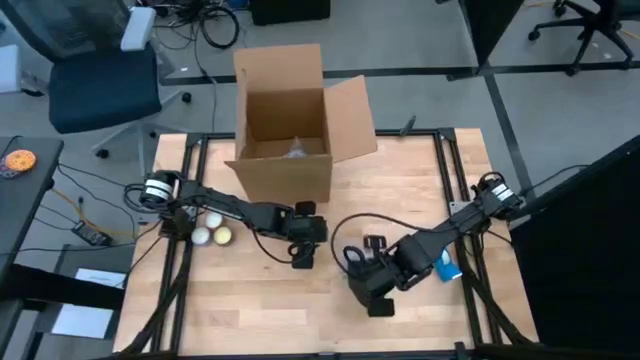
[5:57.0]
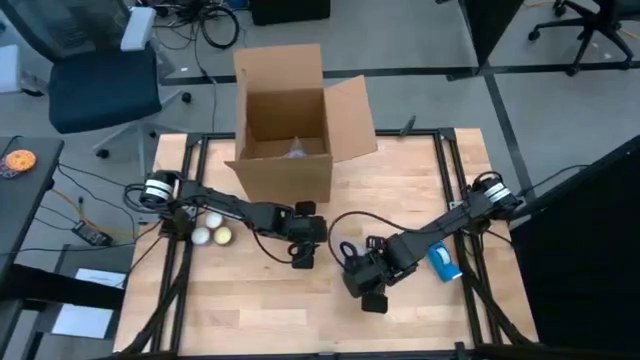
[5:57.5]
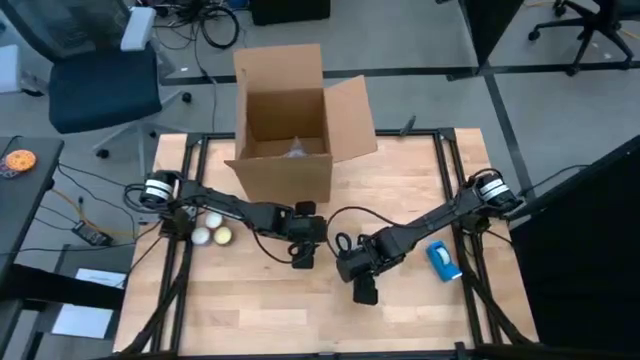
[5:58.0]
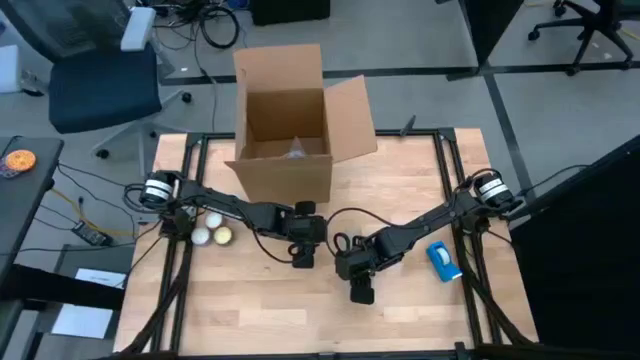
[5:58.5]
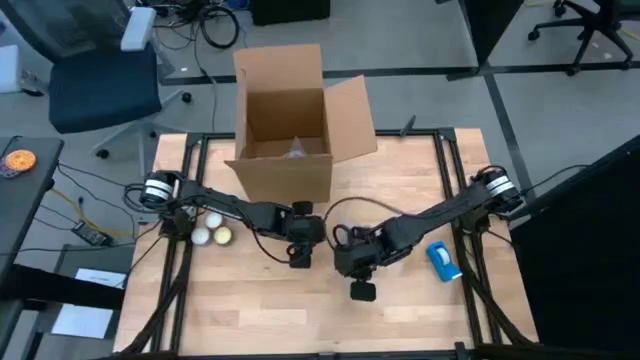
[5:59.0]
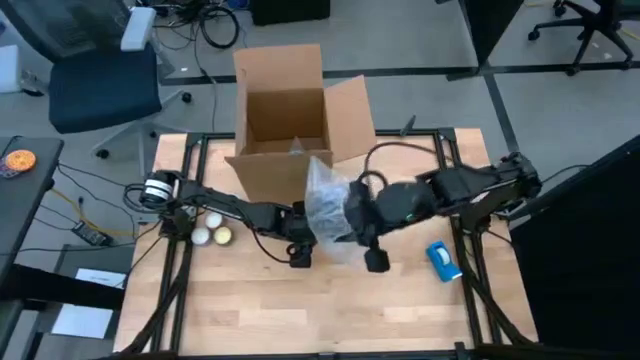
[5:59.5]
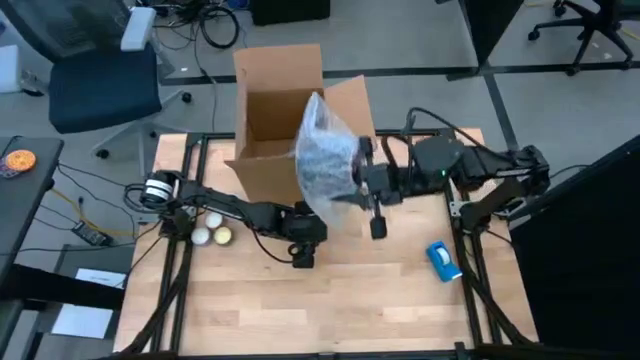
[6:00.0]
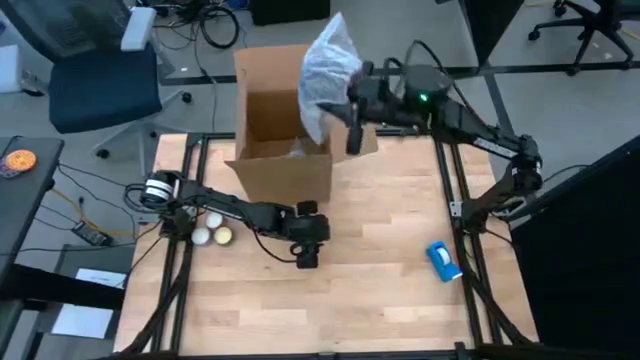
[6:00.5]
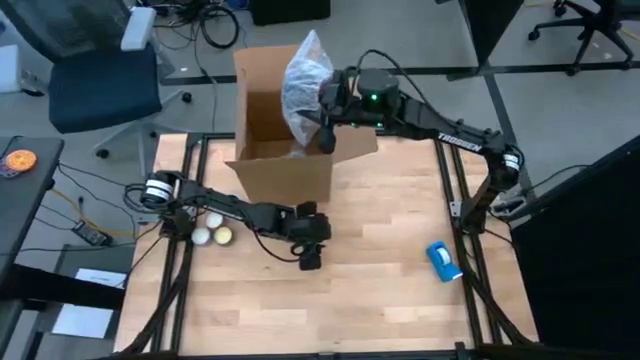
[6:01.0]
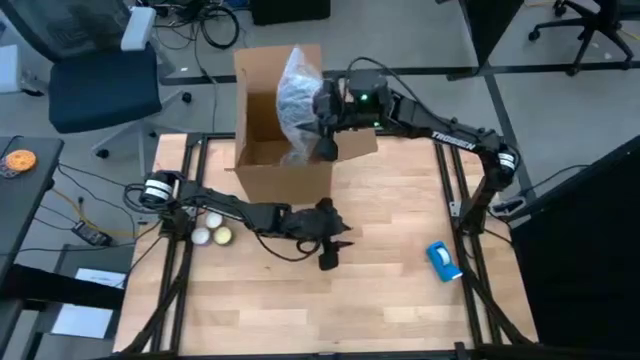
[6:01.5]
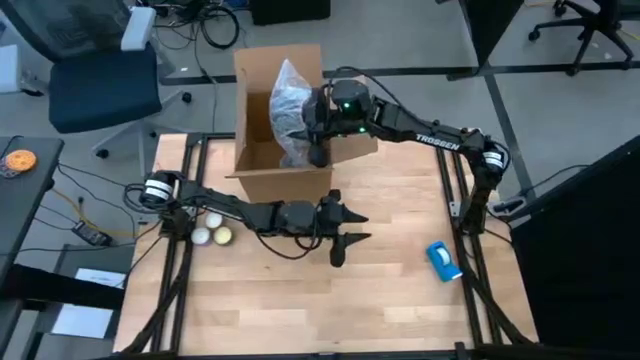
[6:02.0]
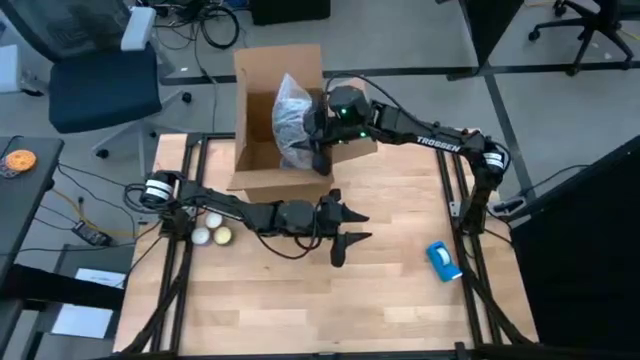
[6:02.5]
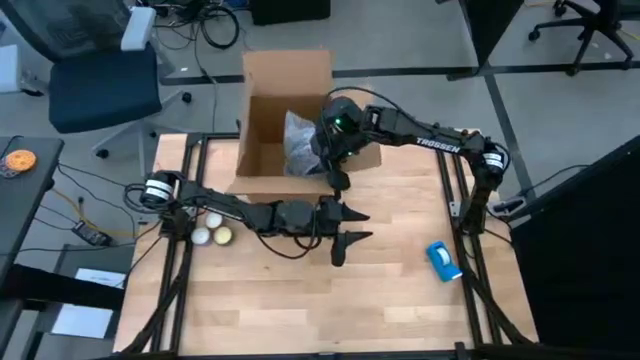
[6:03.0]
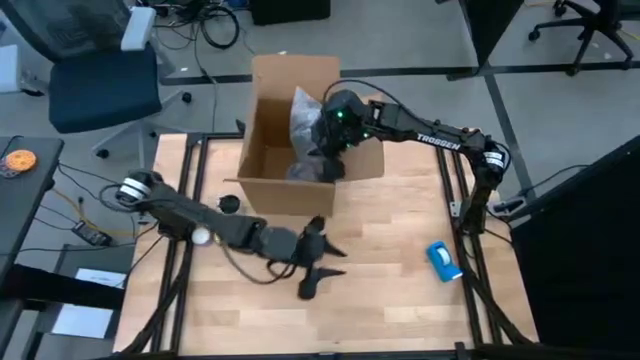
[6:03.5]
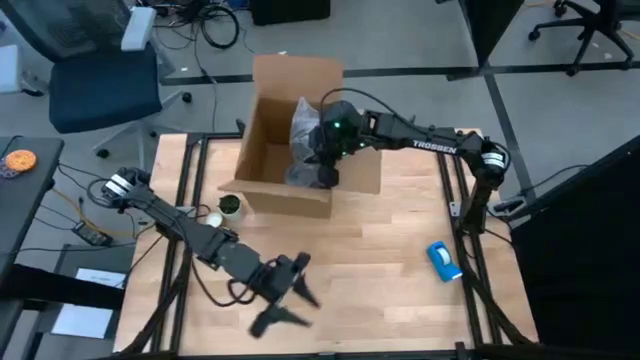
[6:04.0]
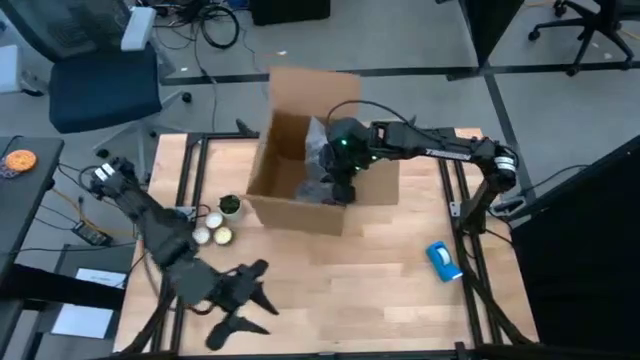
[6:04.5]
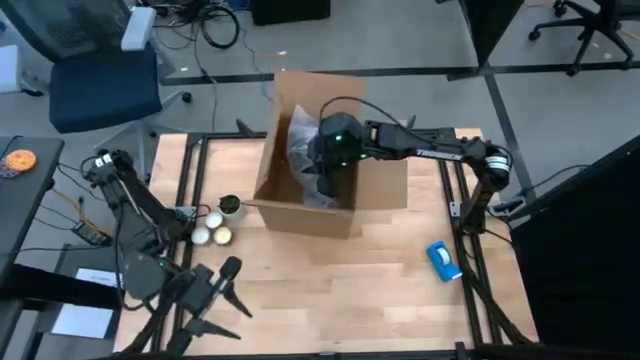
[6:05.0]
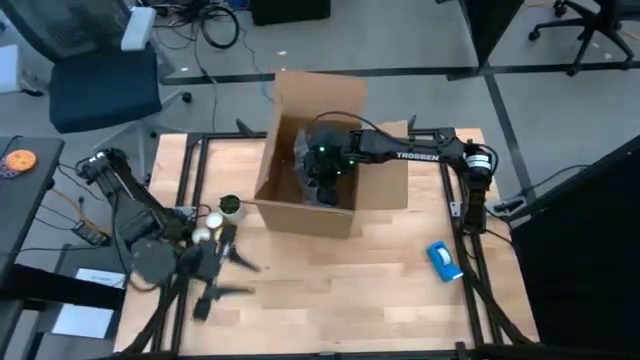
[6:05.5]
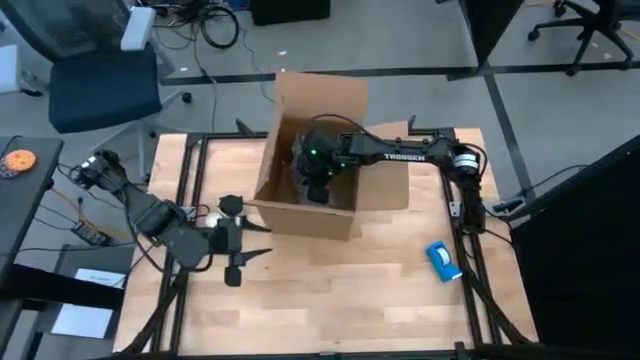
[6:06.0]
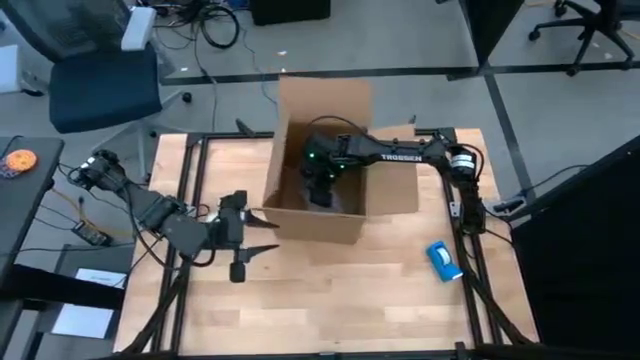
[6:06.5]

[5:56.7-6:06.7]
Task: wrap mug
Put the wrapped black mug into the box

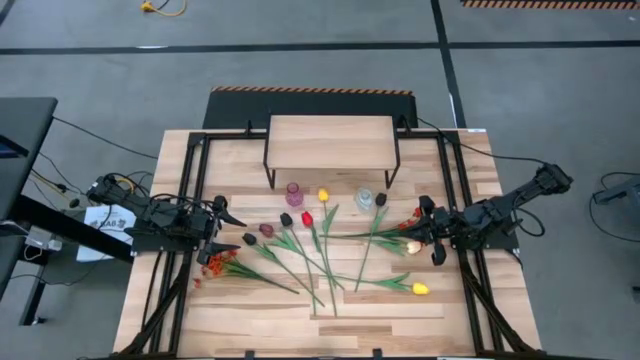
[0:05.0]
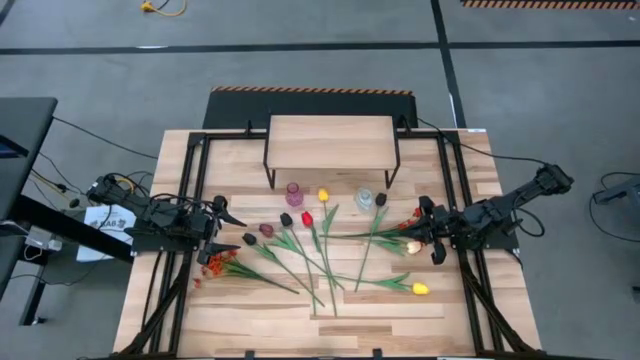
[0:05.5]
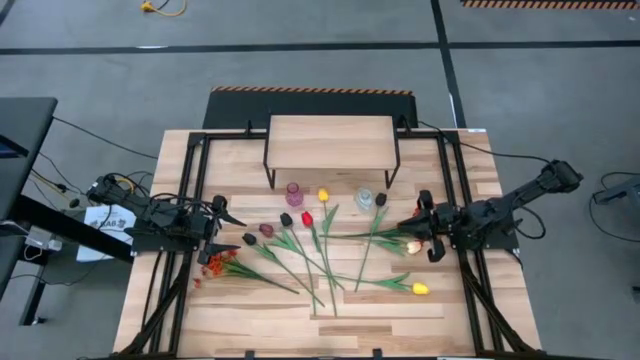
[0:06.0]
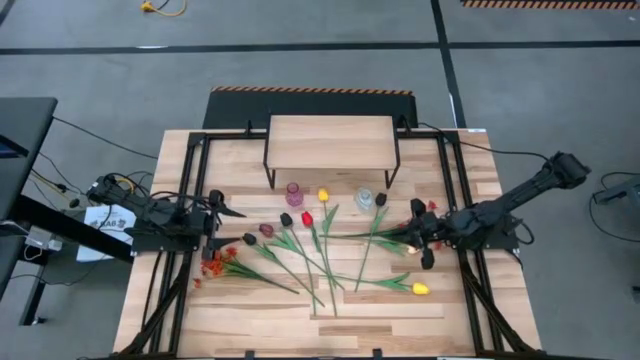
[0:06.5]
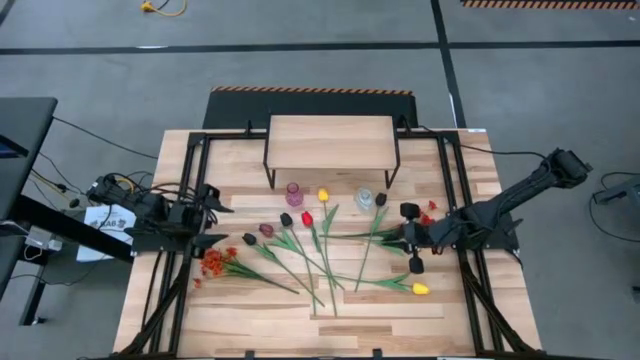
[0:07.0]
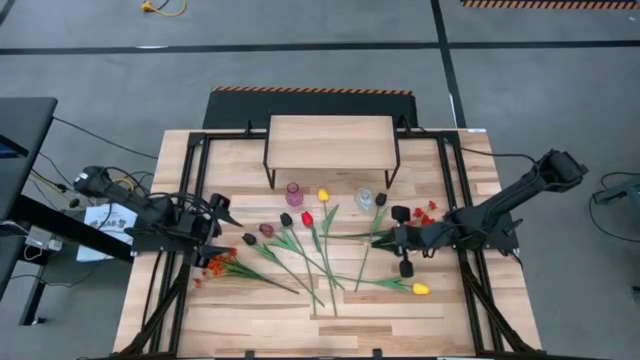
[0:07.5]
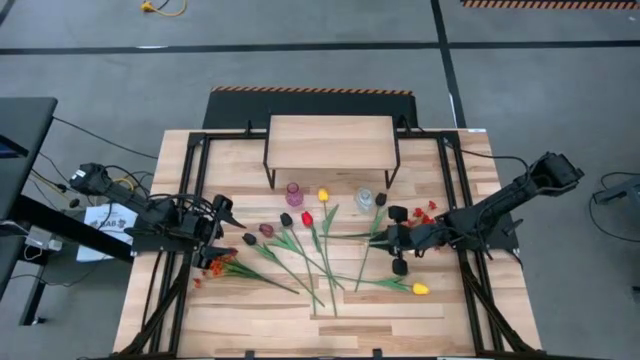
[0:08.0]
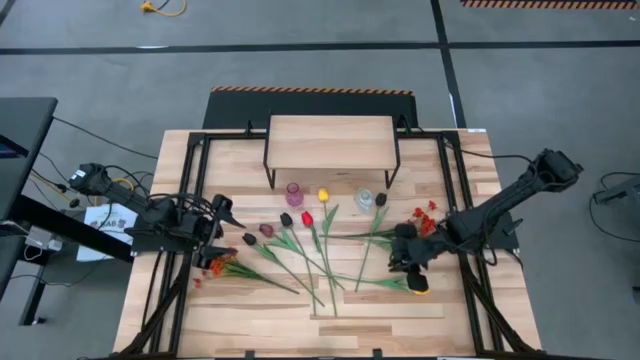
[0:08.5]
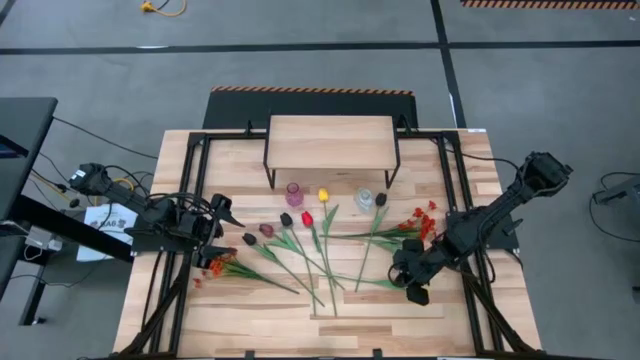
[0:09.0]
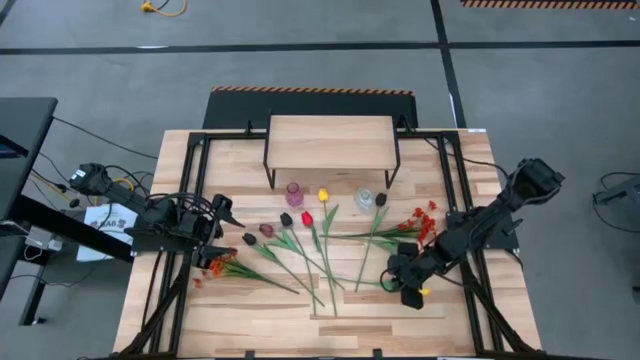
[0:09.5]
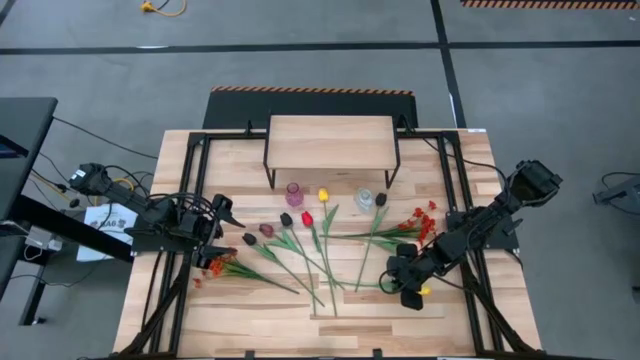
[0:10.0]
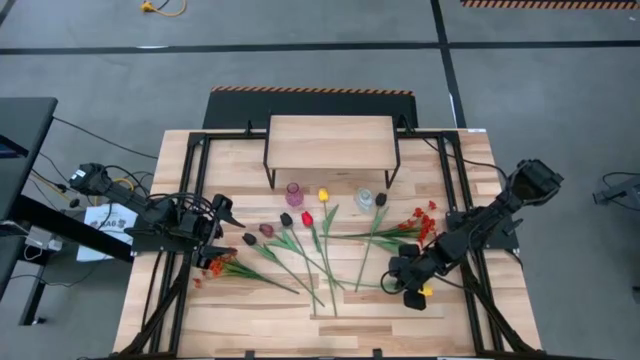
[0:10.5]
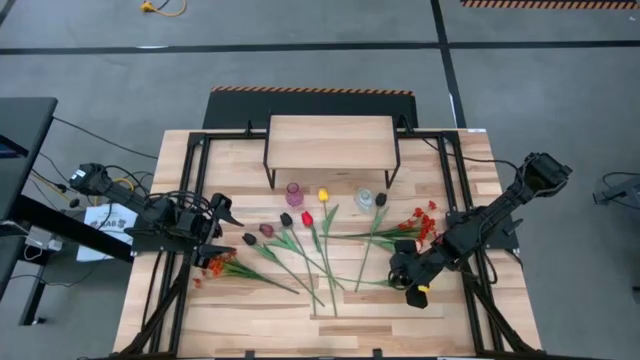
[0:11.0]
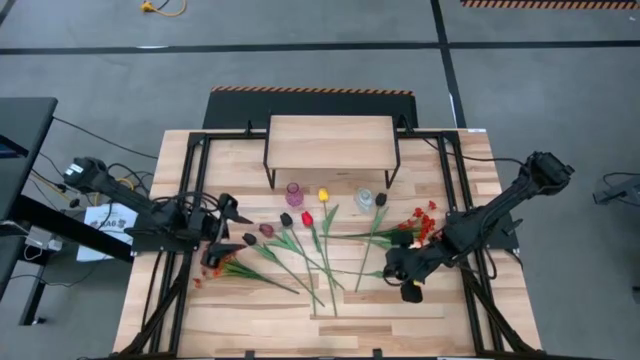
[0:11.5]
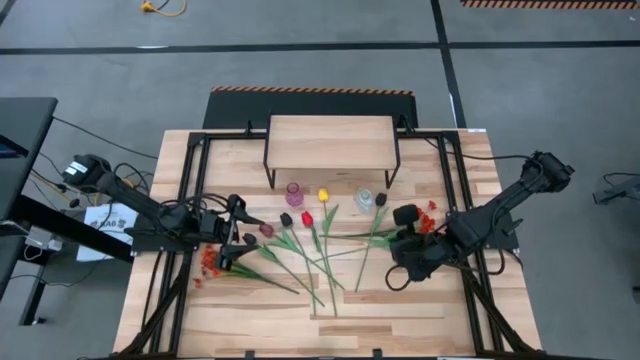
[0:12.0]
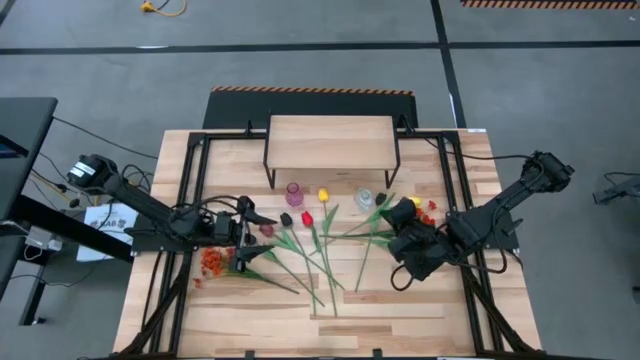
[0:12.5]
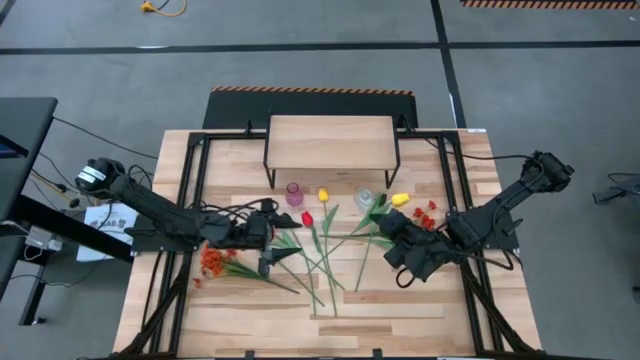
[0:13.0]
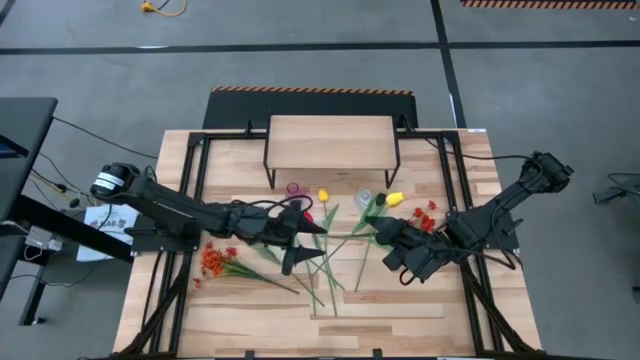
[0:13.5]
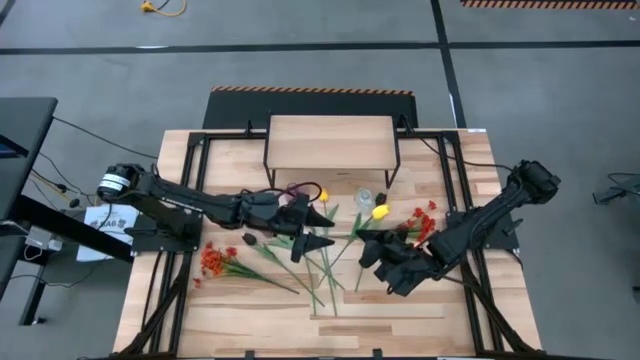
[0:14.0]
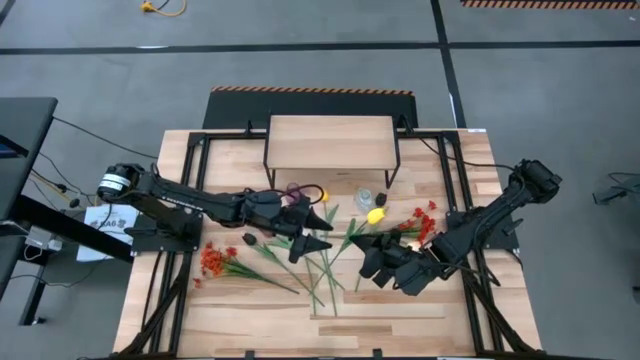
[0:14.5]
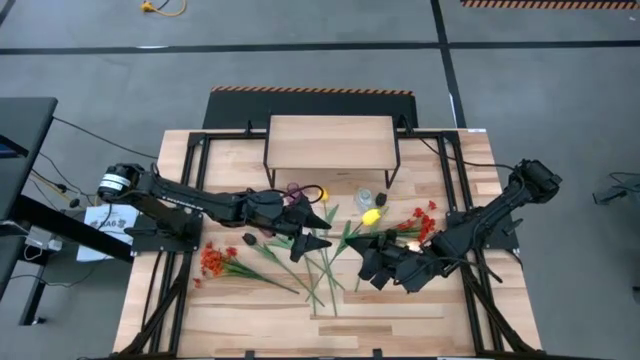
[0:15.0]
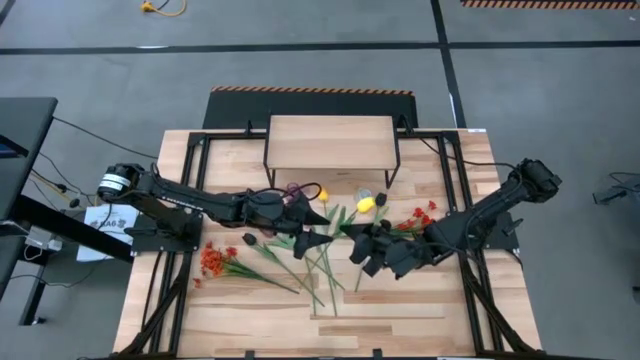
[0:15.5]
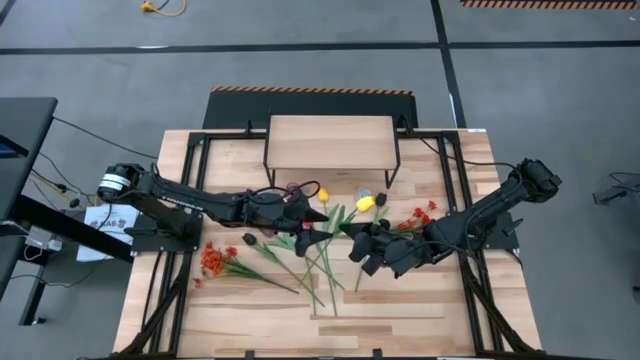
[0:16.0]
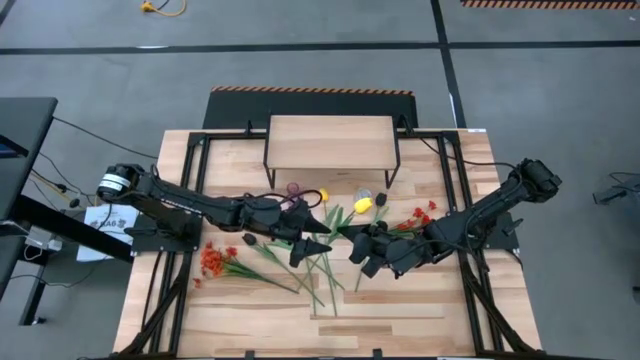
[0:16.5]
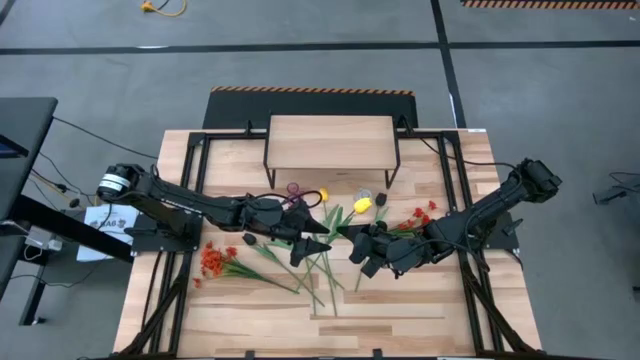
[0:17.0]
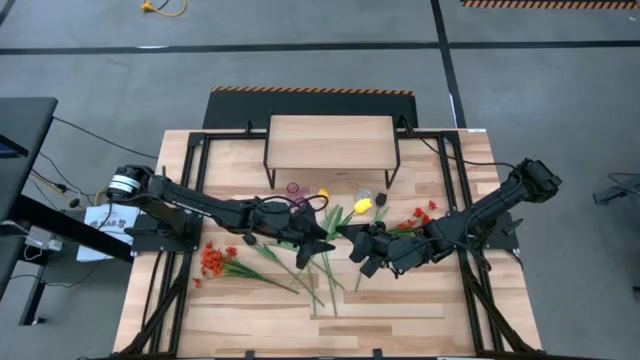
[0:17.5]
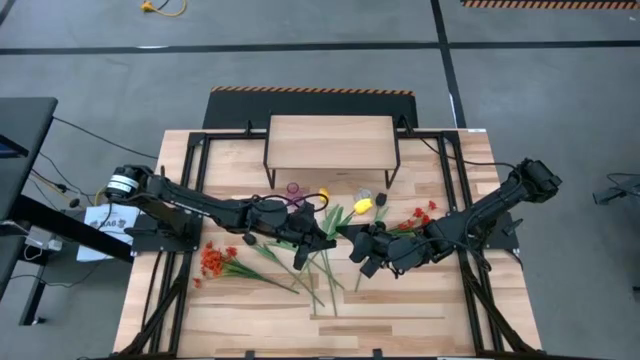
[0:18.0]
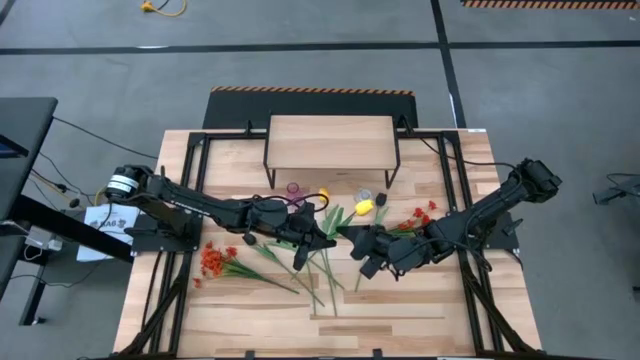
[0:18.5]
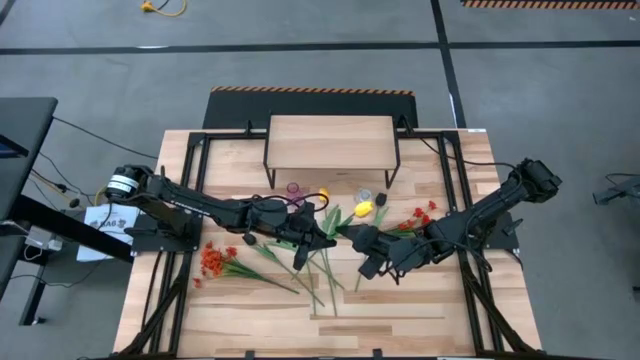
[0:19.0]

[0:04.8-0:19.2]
Task: Pick and place flowers into a vace then onto a shelf
Put the bottom yellow tulip into the violet vase
